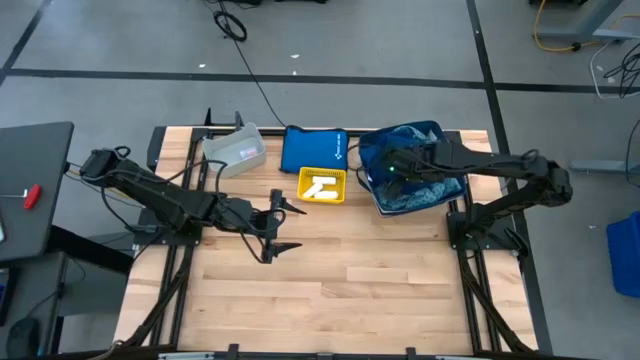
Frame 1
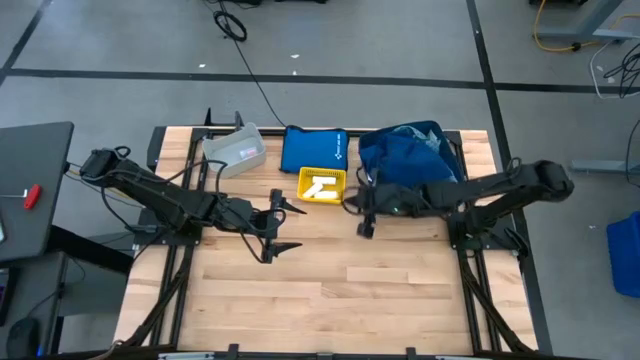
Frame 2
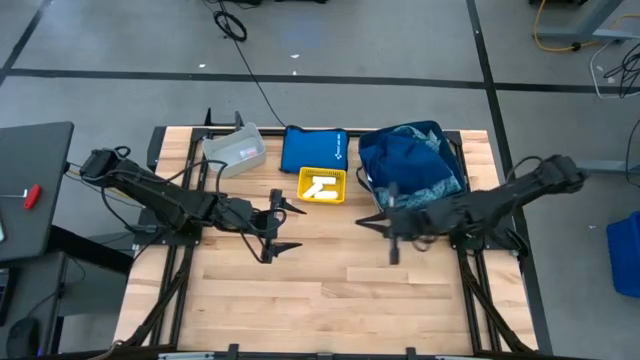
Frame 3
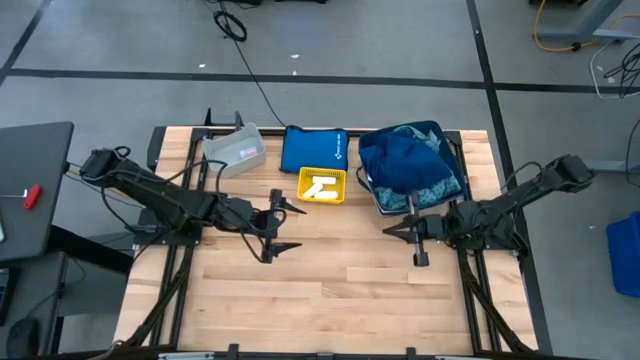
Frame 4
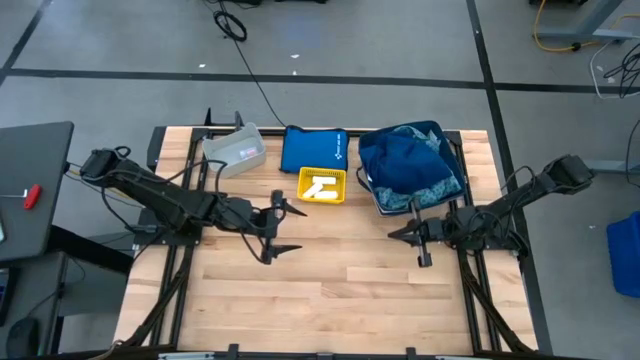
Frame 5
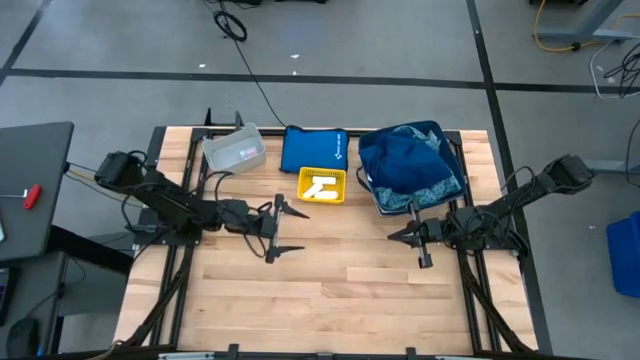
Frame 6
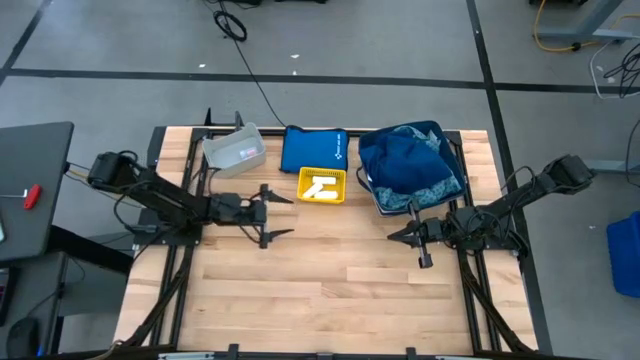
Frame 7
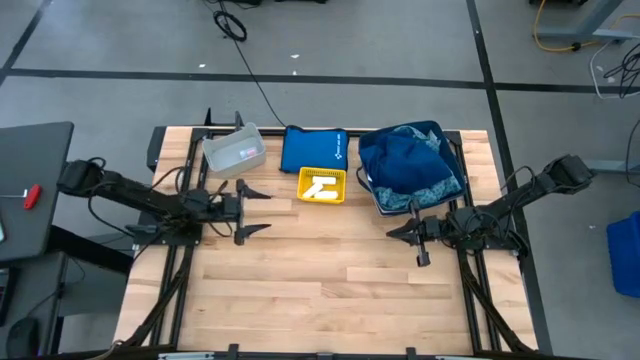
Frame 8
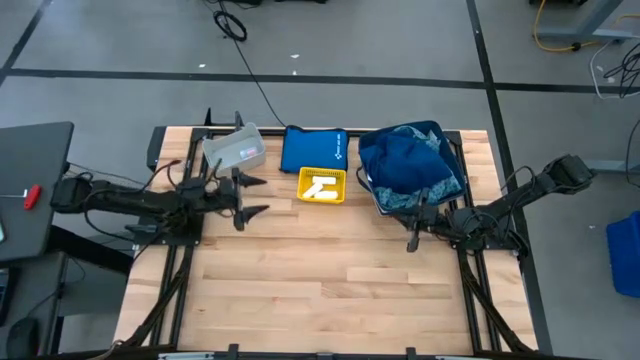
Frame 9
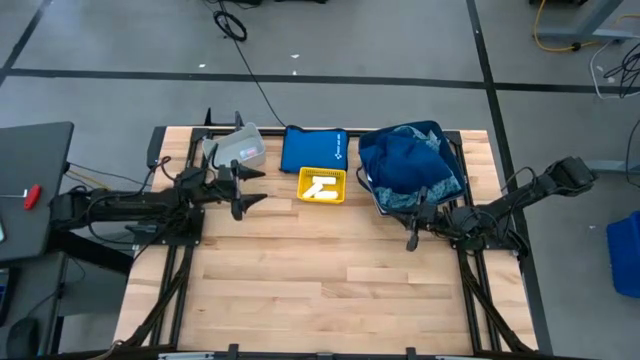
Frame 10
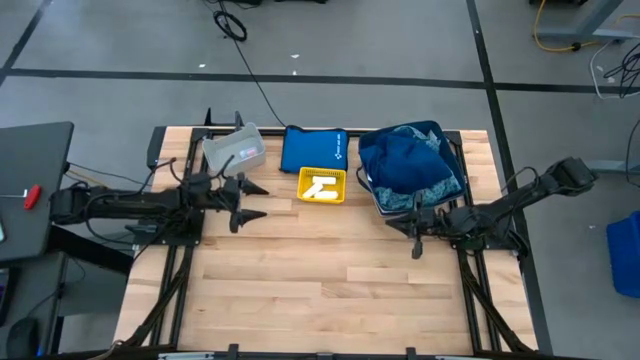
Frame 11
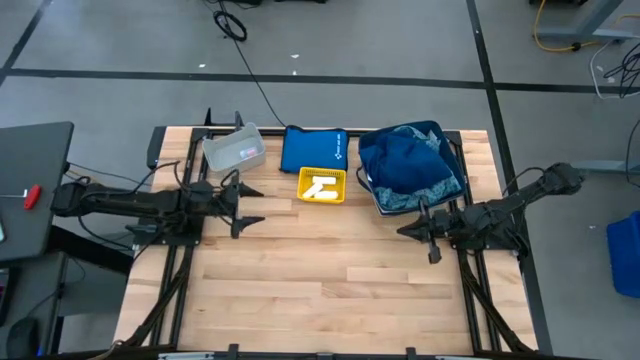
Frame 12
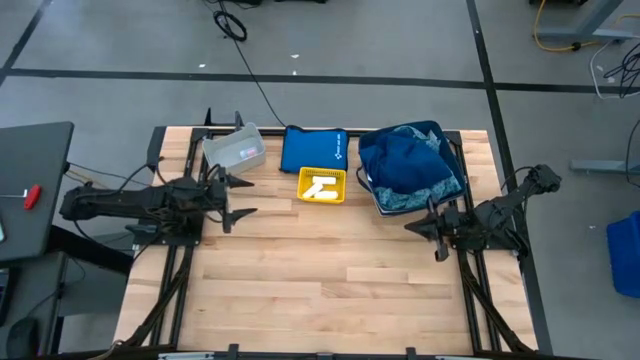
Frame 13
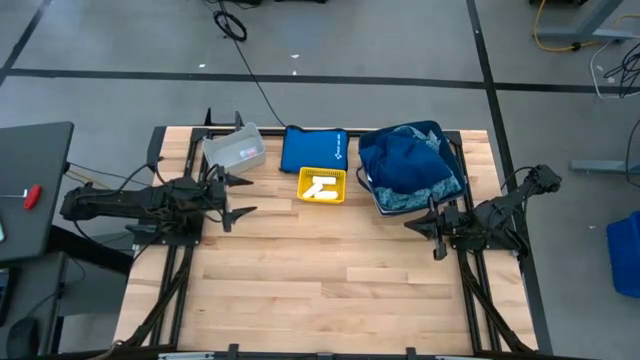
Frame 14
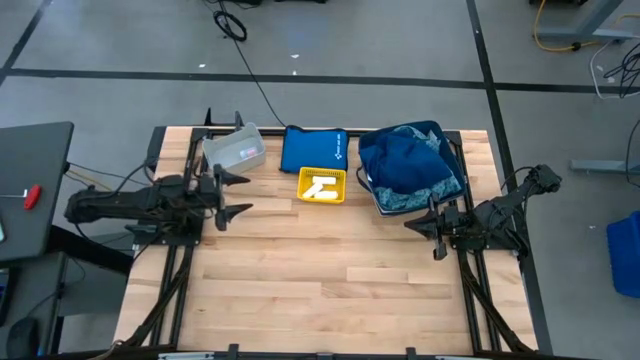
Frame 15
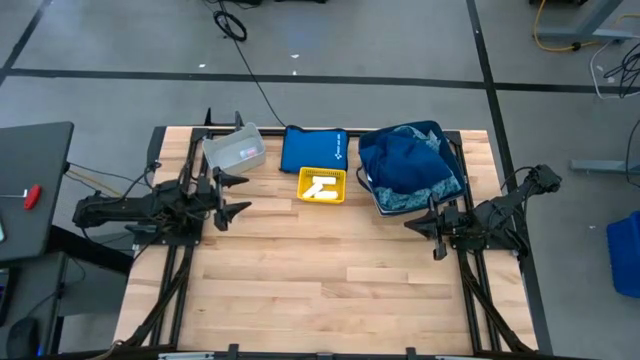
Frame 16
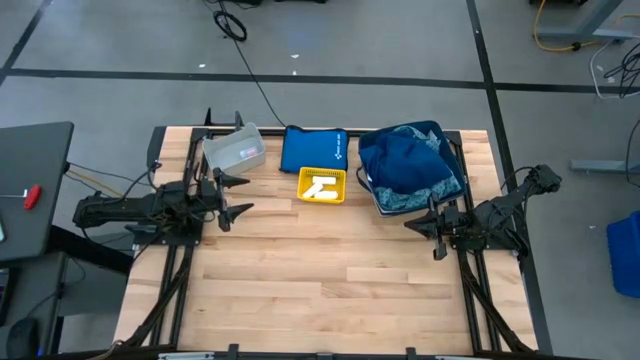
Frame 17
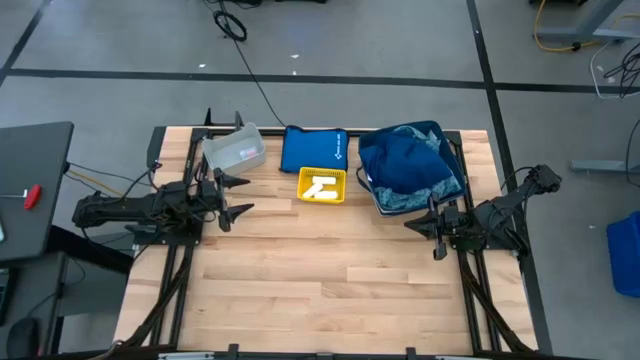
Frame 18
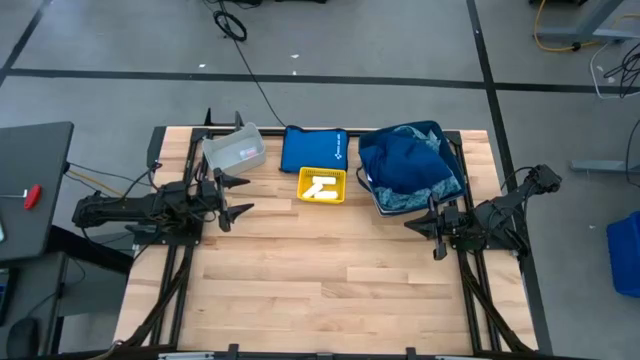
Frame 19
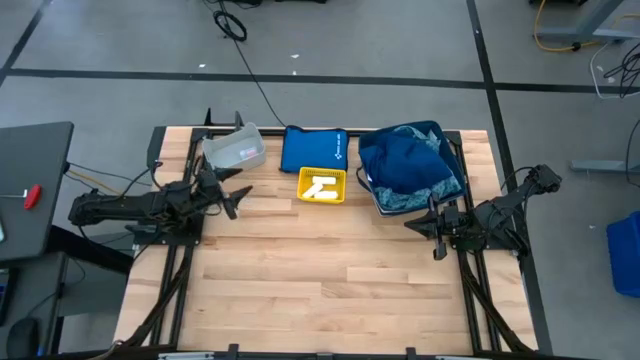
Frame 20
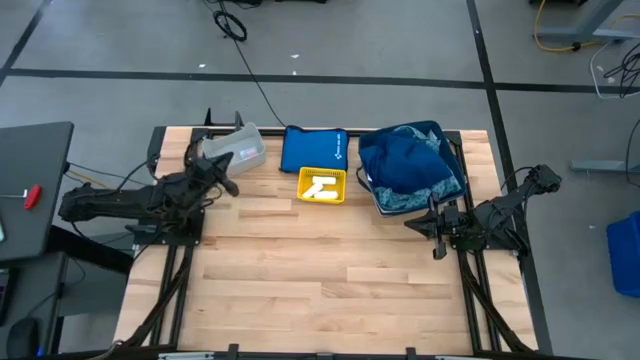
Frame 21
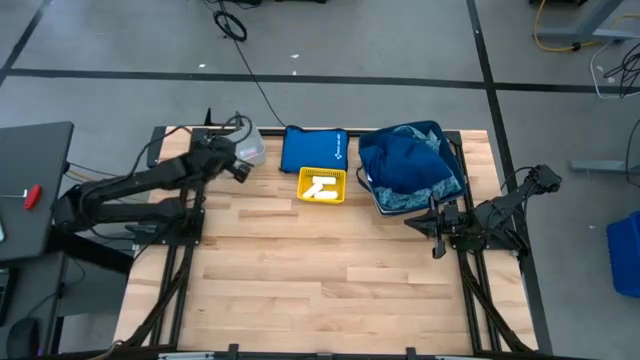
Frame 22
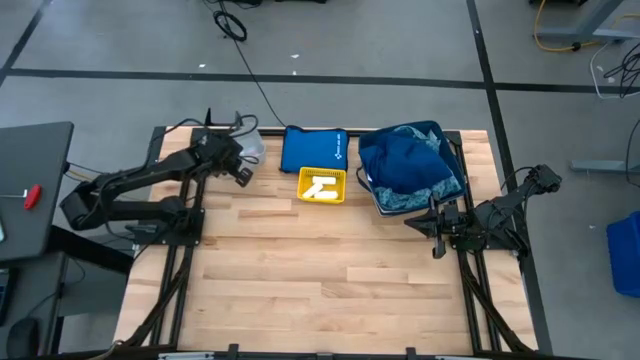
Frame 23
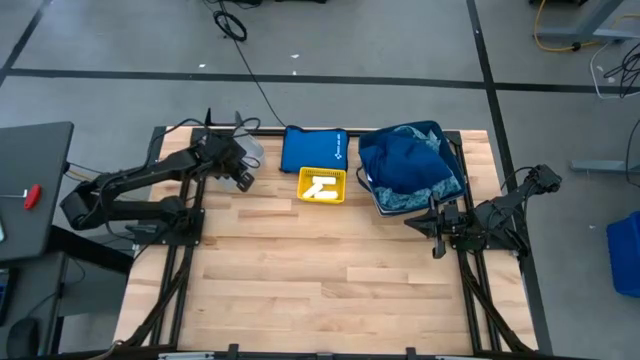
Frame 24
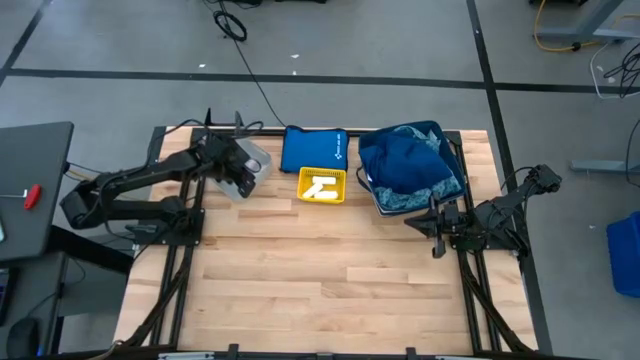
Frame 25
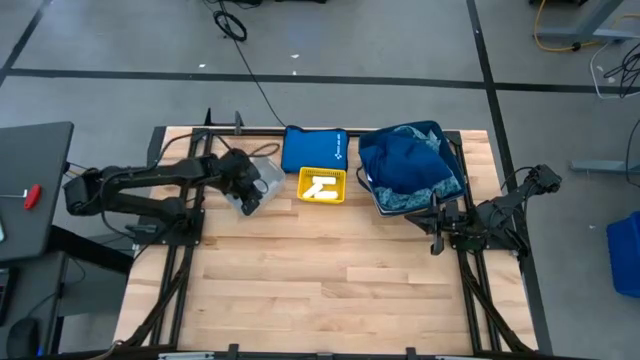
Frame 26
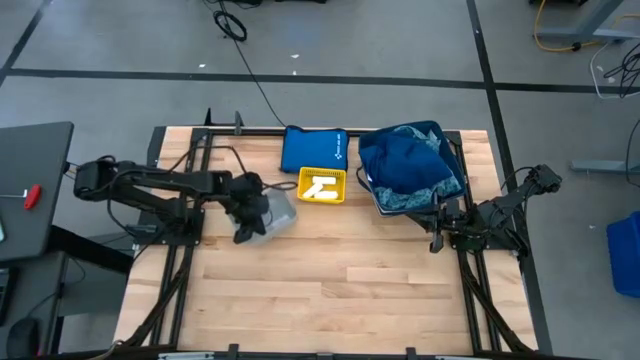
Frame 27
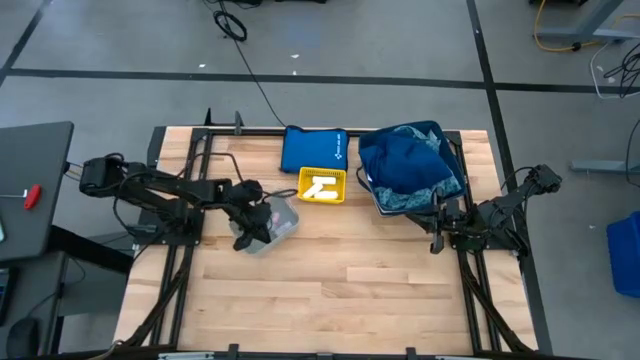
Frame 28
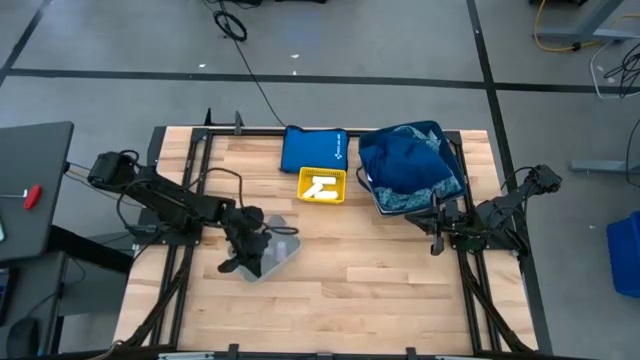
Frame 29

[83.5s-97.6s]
Task: Pick & place medical supplies in basket/bin
Move the gray bin to the center of the table

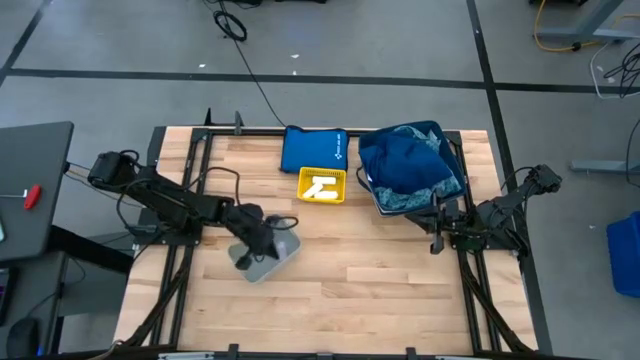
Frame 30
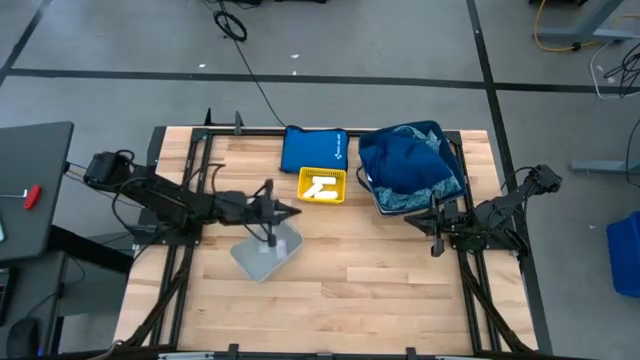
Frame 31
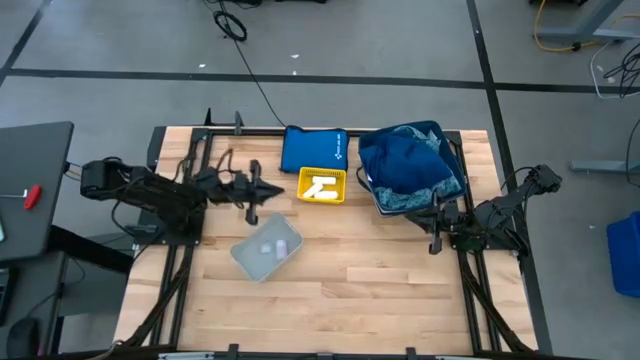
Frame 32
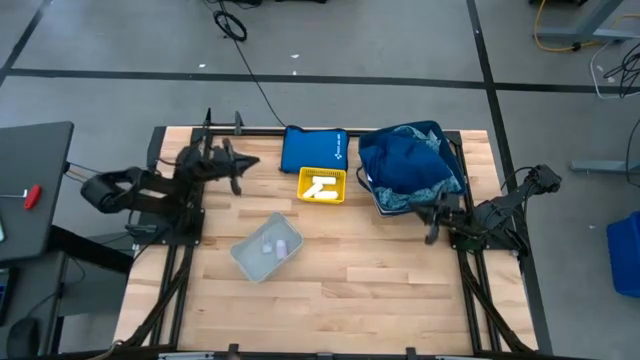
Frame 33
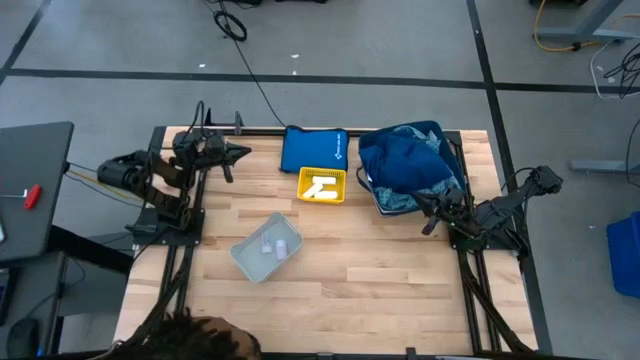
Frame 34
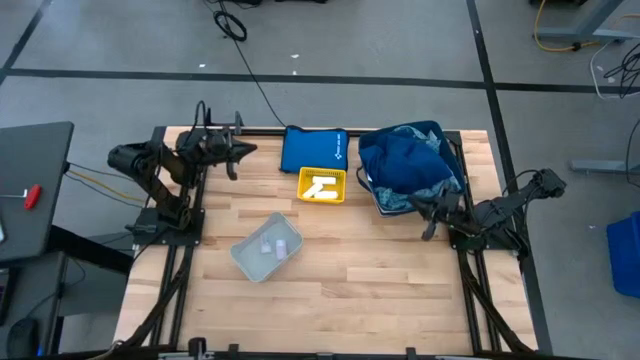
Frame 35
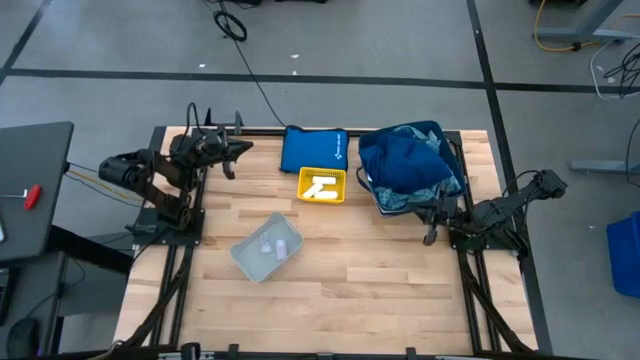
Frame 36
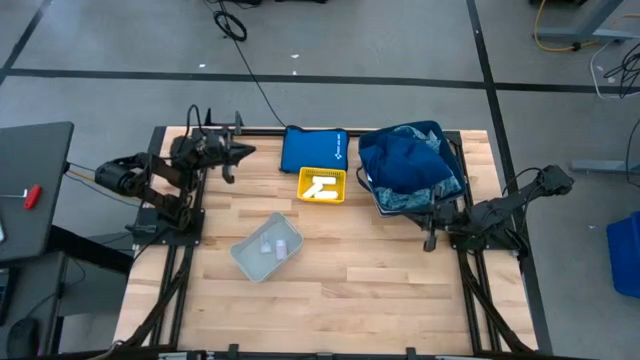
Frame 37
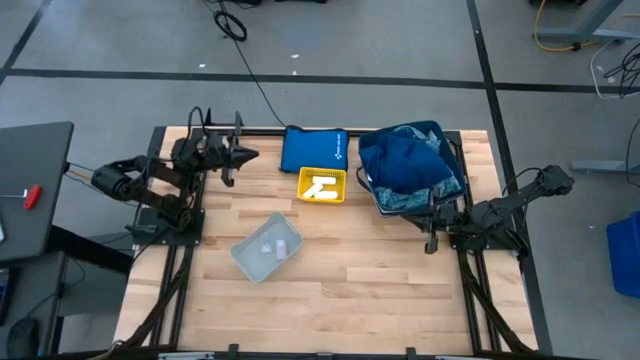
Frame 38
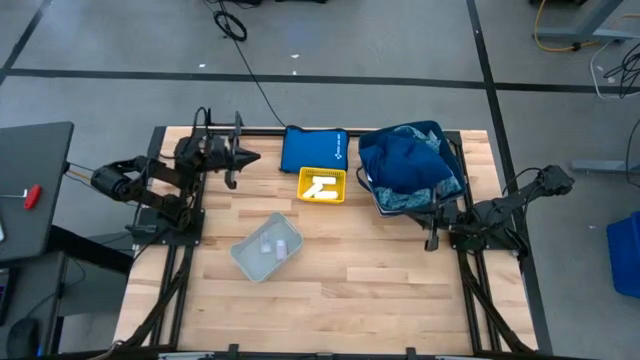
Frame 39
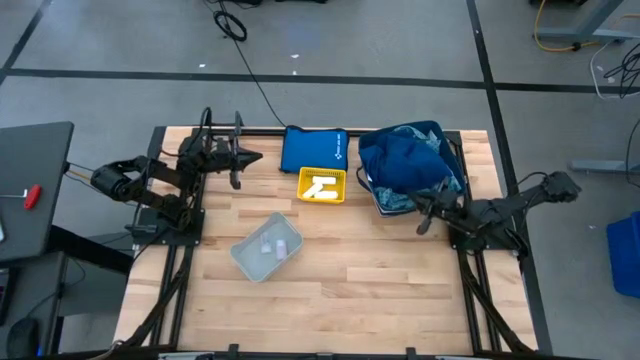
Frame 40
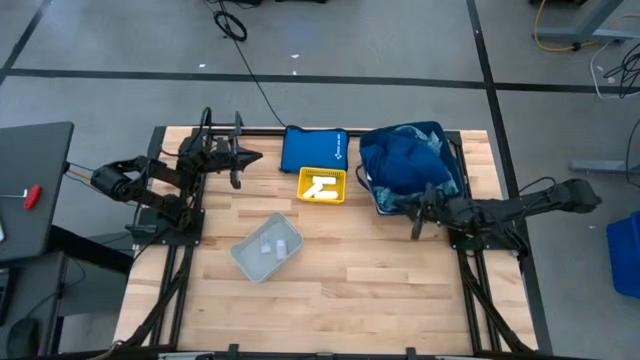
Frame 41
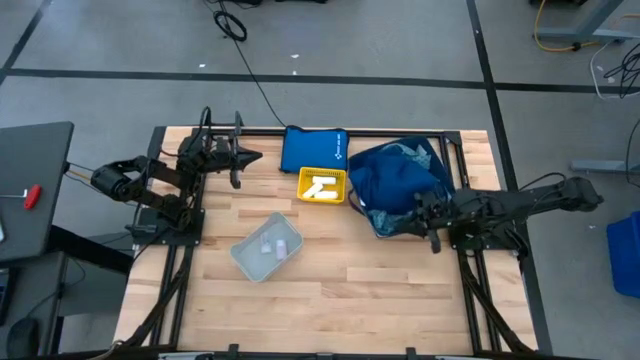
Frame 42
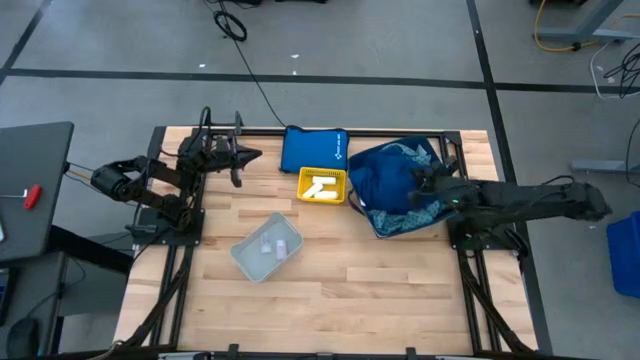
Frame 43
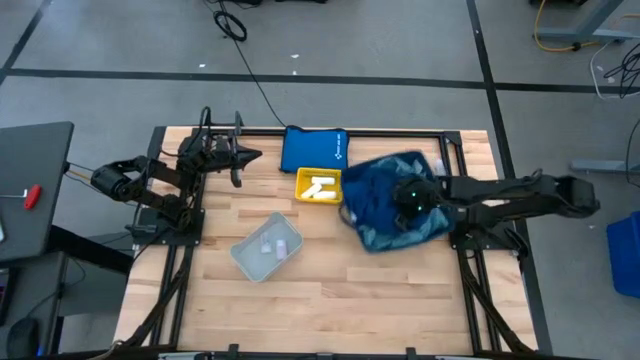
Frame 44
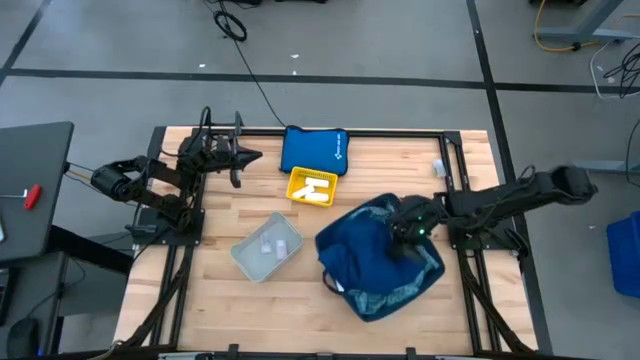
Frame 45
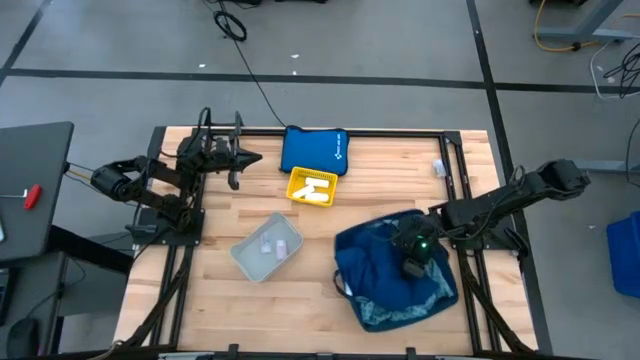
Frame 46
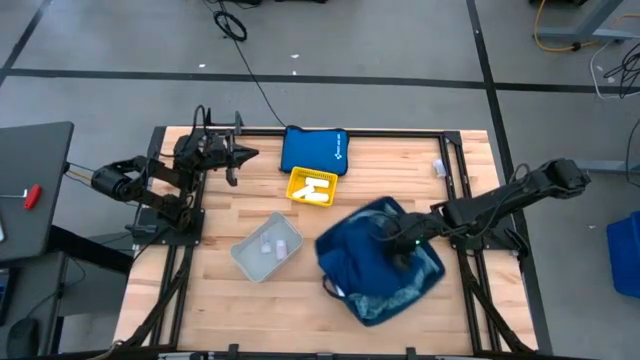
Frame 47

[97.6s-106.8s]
Move the blue bin to the center of the table
